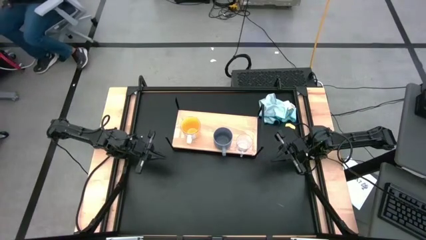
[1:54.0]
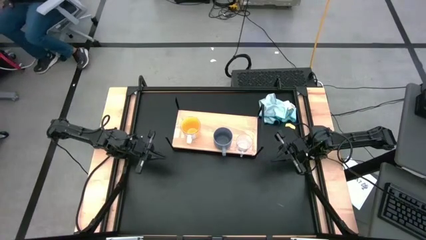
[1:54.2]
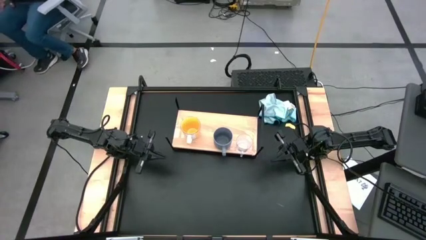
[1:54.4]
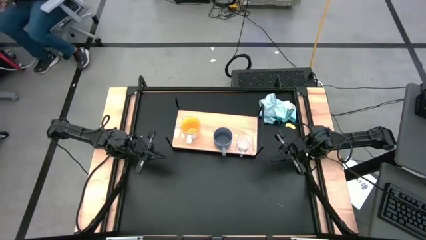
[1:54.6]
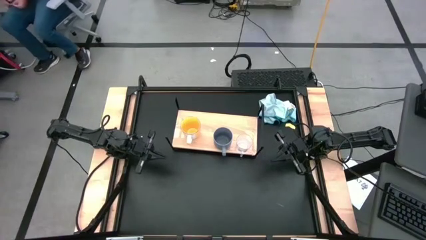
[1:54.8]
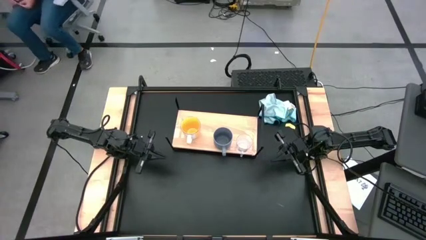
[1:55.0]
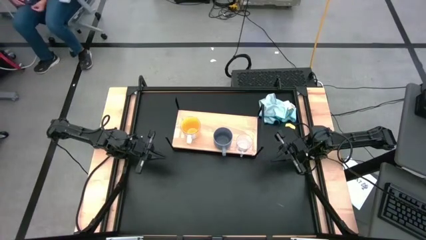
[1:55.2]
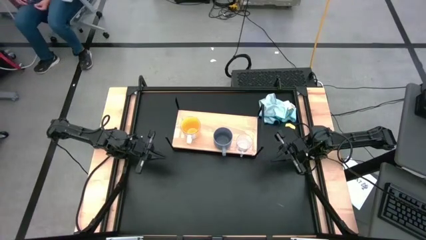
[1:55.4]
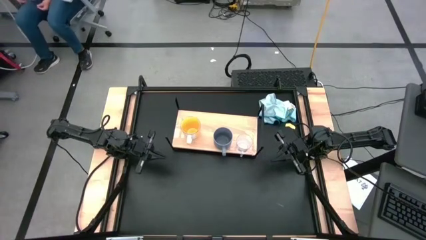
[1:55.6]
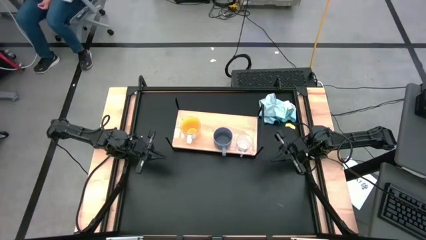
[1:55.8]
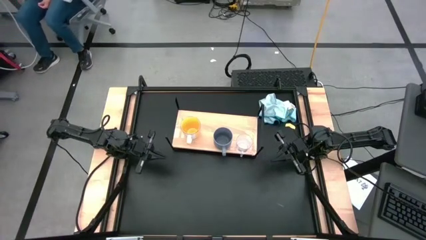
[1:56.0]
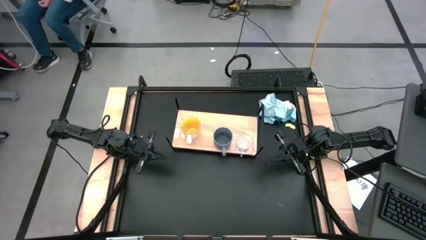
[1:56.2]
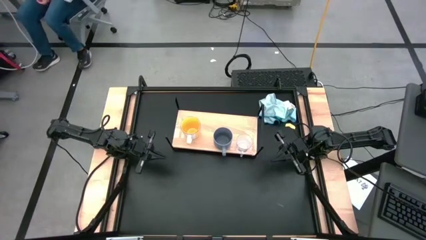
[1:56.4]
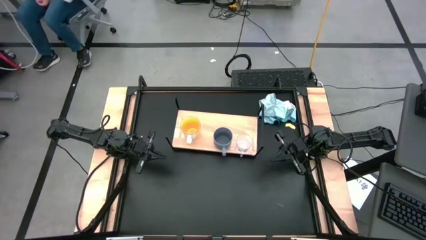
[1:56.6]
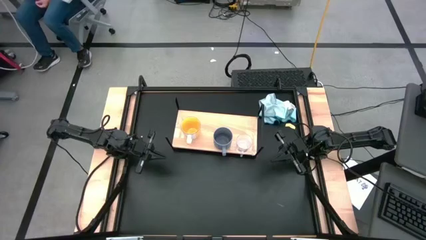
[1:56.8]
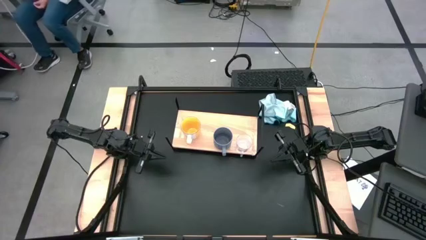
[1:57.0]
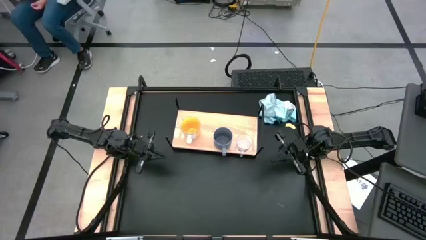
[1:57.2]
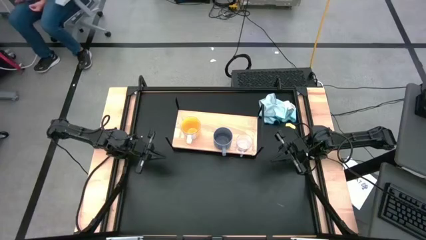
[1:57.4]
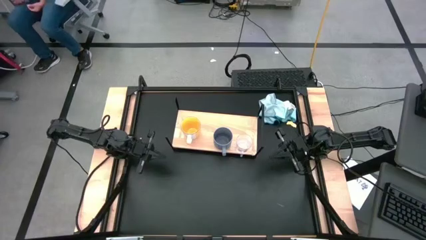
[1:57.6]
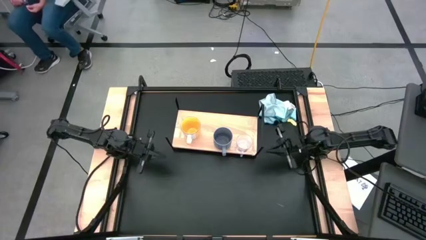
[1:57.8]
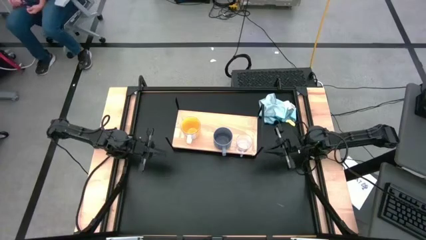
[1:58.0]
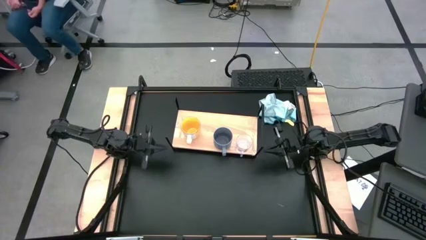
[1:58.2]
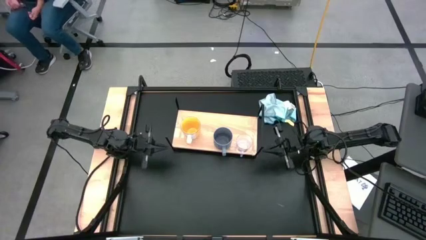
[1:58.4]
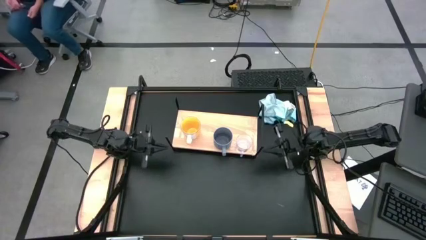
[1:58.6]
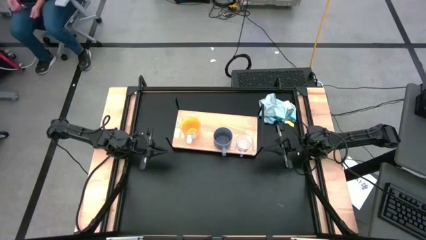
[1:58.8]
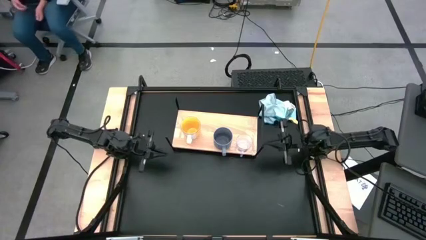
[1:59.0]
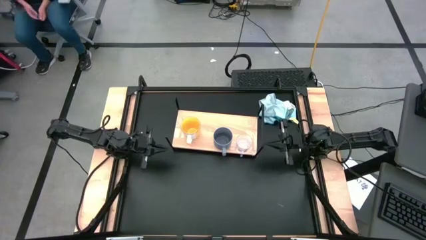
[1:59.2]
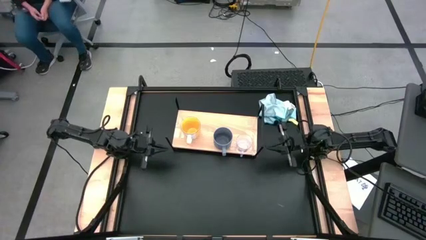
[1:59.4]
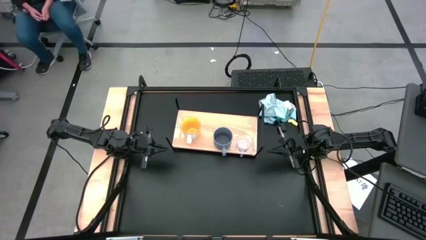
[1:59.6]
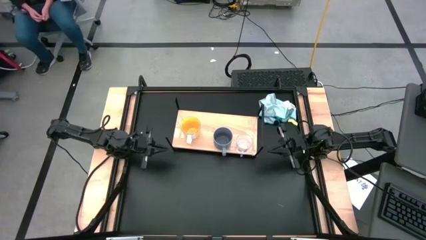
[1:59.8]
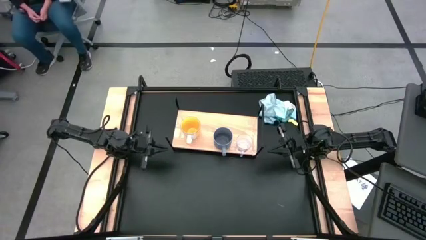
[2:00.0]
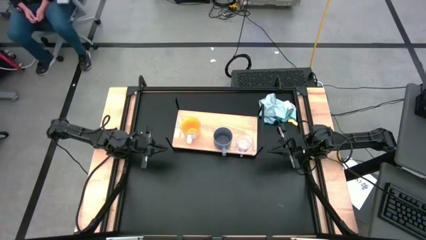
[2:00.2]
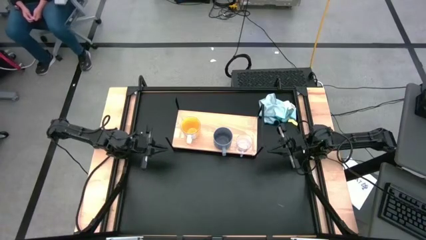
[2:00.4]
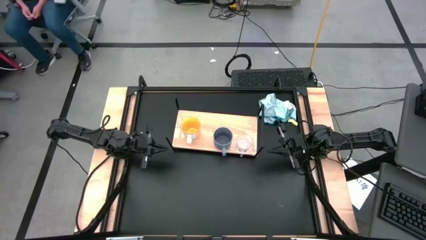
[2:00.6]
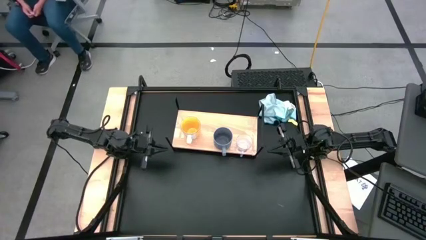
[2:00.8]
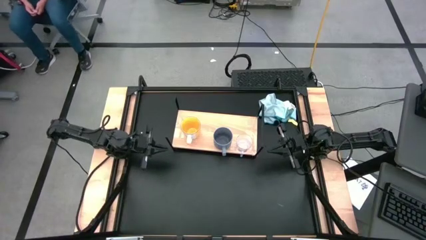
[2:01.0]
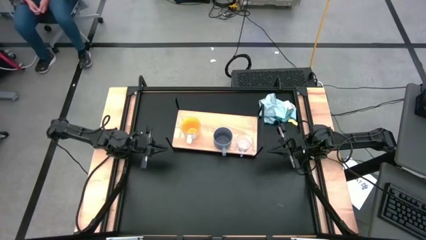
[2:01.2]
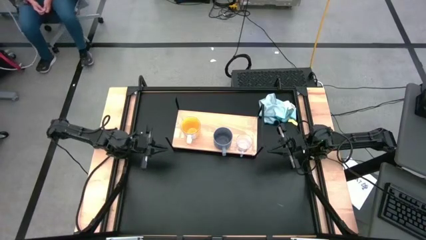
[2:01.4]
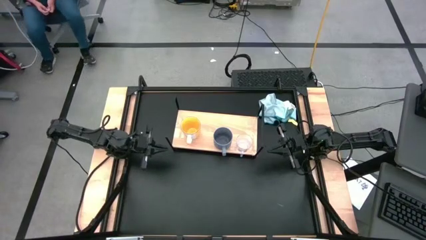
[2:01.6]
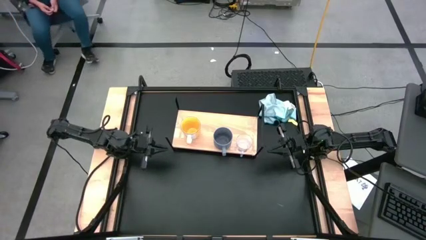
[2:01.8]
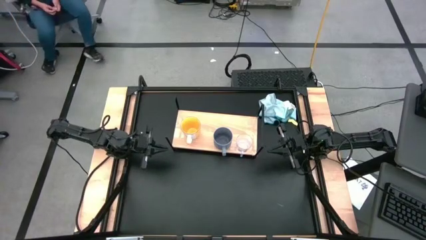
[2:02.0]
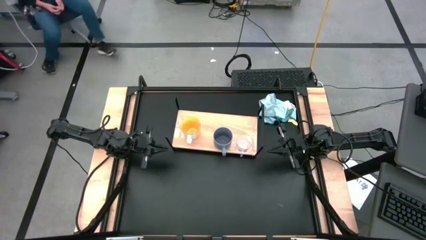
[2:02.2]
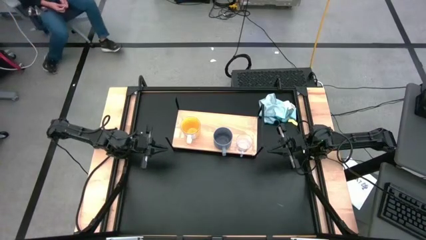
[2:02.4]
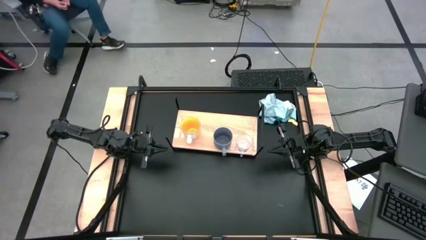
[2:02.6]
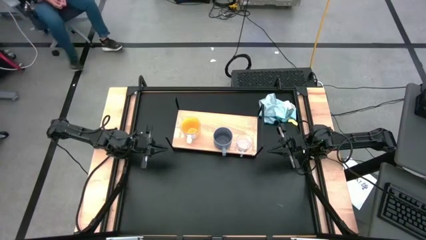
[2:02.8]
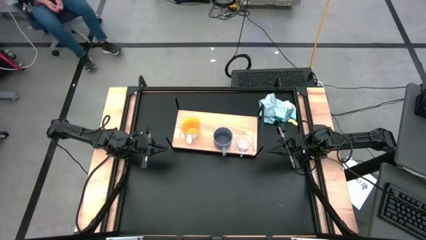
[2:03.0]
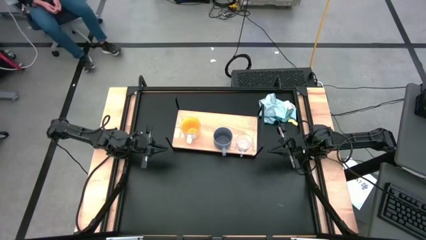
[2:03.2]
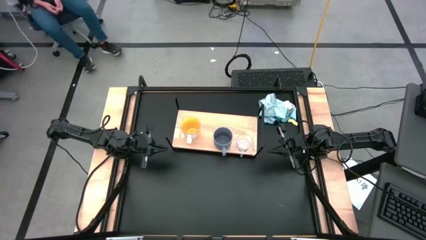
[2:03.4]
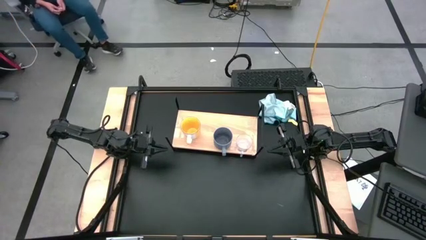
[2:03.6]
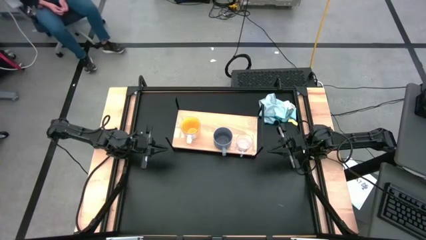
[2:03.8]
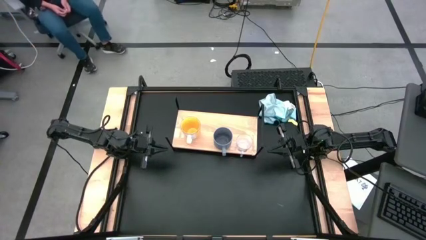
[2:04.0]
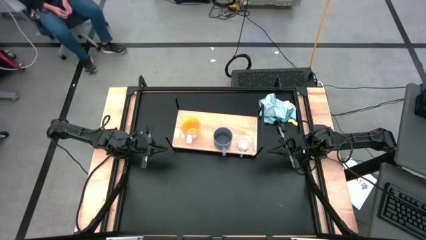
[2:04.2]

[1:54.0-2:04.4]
Task: Stack small to large cups/mugs on shelf
Return to Home Position
